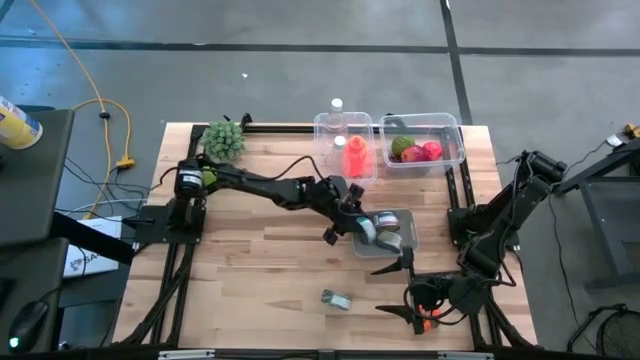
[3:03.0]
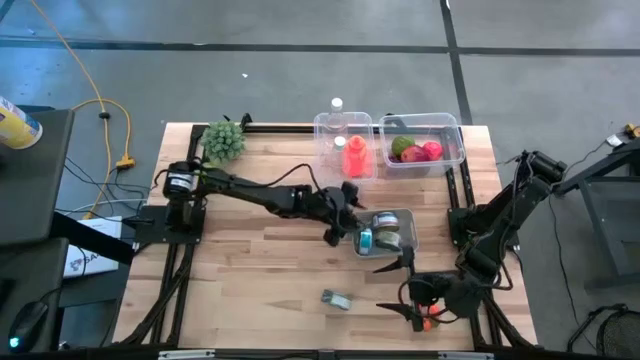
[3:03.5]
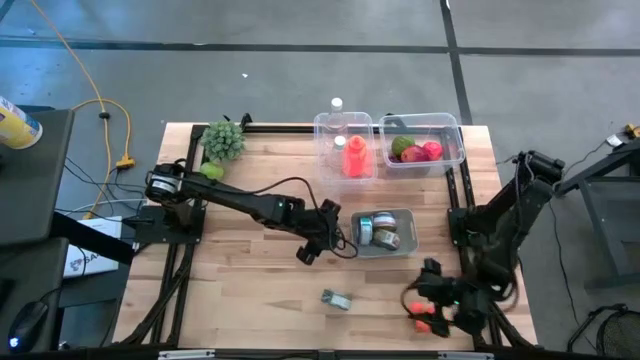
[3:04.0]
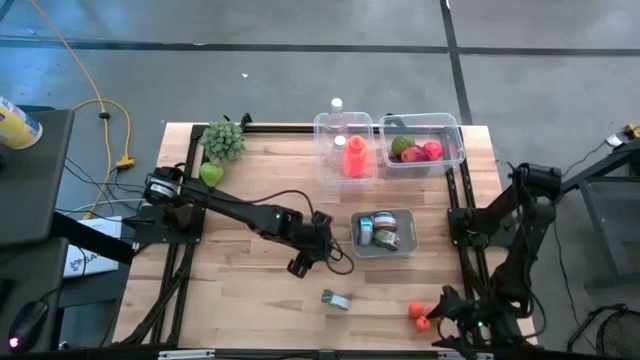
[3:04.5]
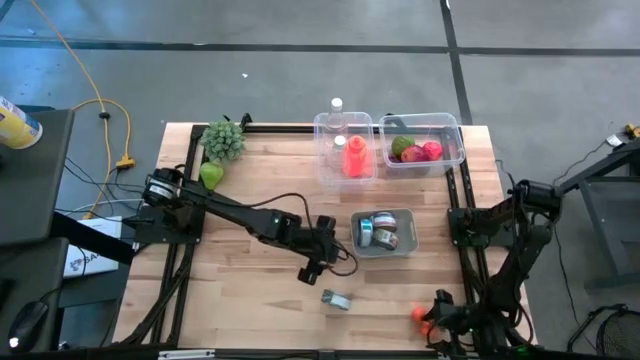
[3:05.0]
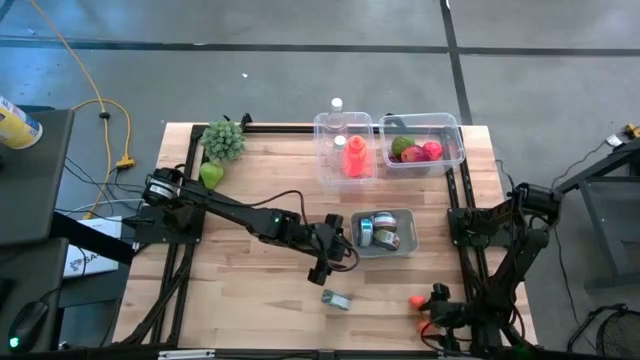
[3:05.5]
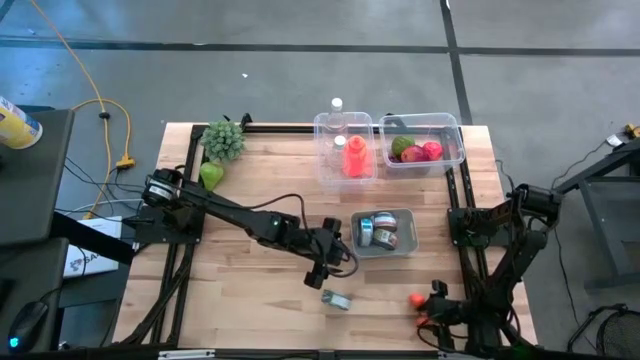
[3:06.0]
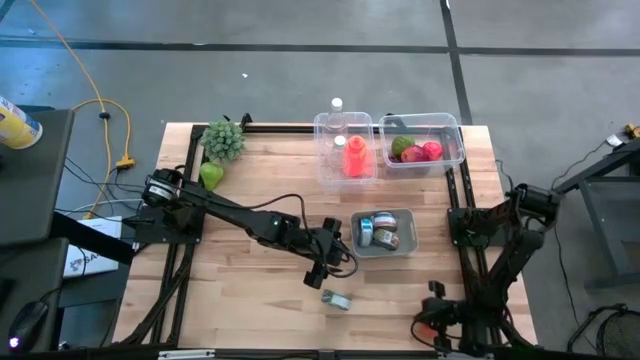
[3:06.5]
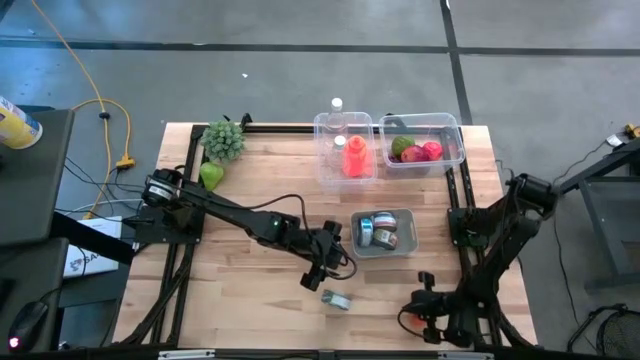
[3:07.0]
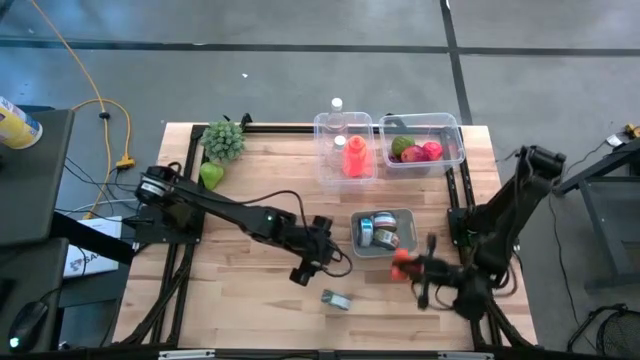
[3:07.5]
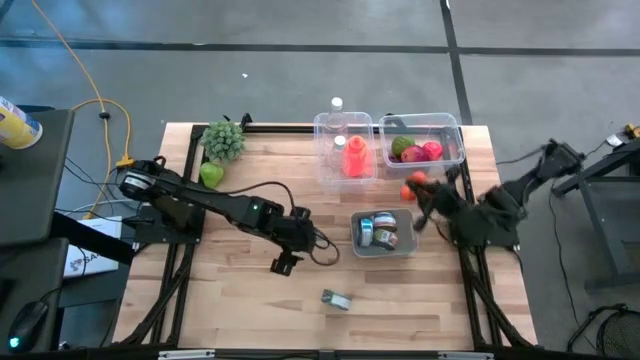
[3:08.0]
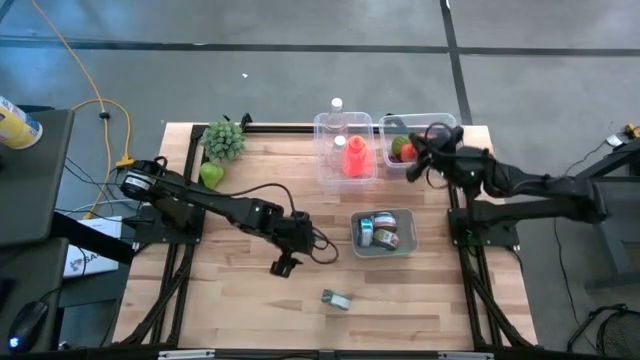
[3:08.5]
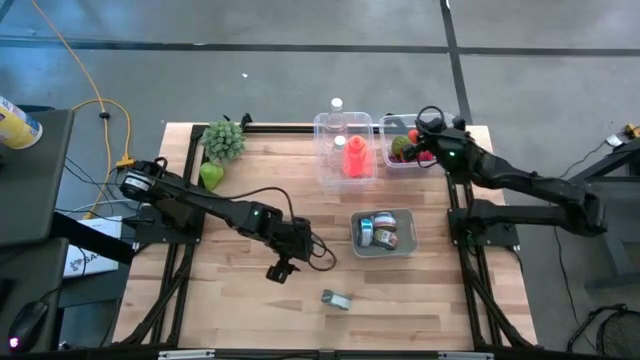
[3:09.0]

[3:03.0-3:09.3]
Task: Pick & Place Food Item
Put the tangerines into the right transparent bin

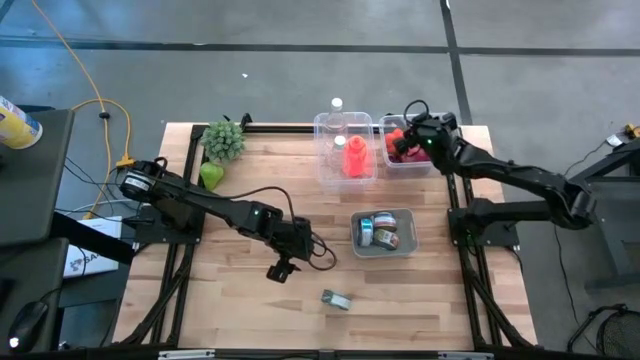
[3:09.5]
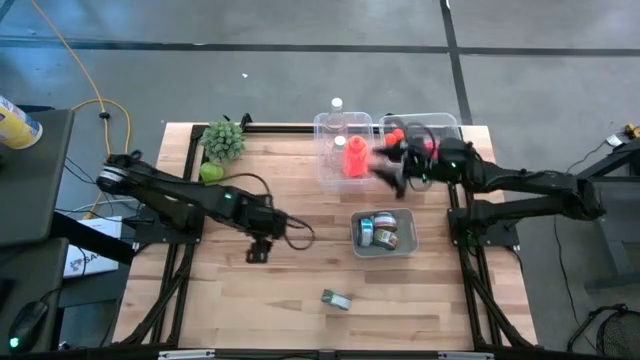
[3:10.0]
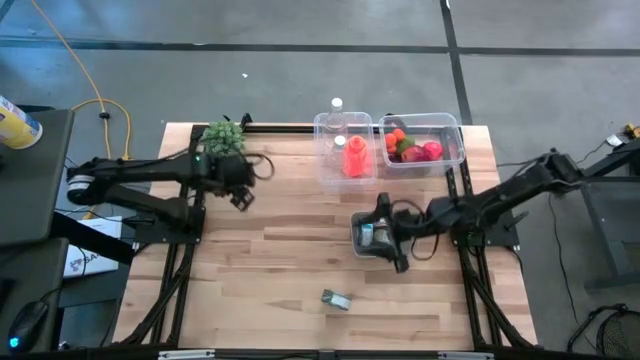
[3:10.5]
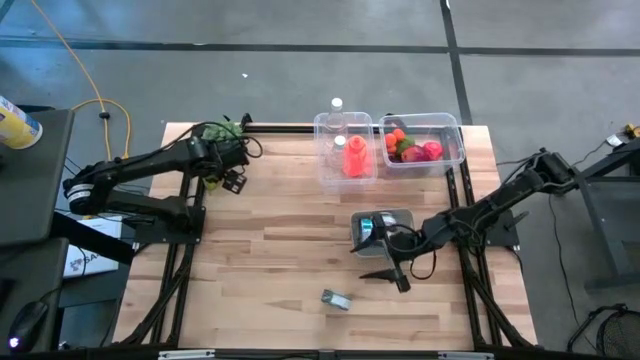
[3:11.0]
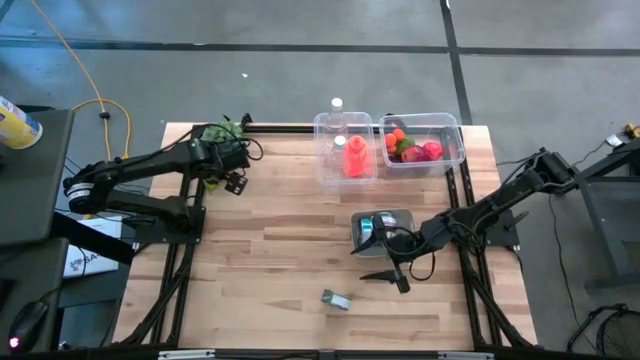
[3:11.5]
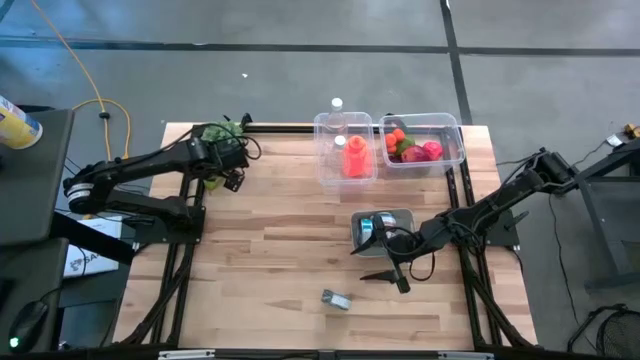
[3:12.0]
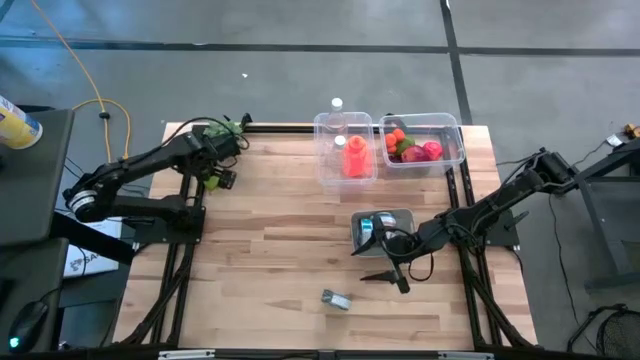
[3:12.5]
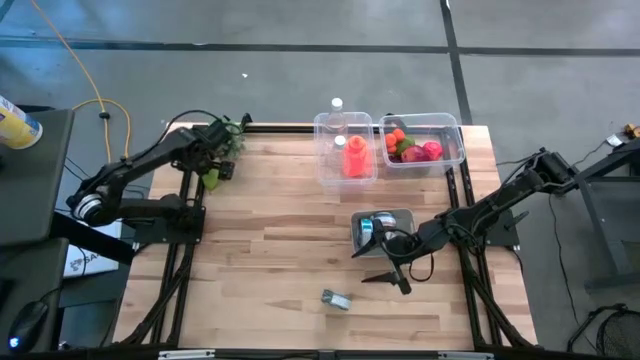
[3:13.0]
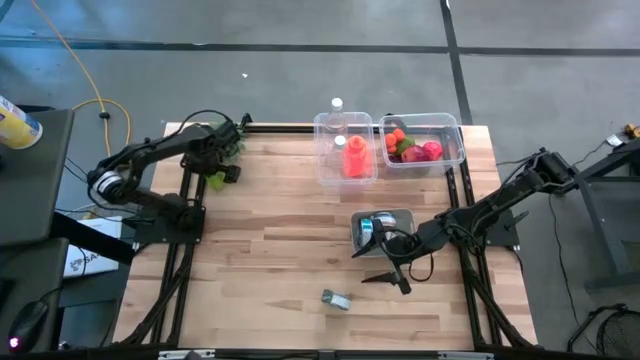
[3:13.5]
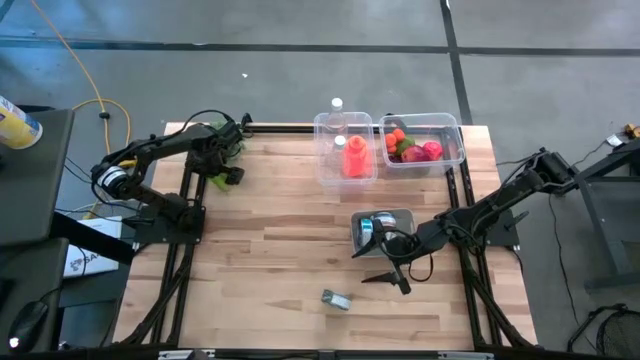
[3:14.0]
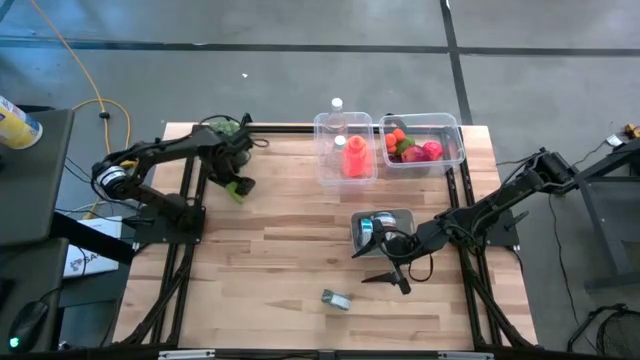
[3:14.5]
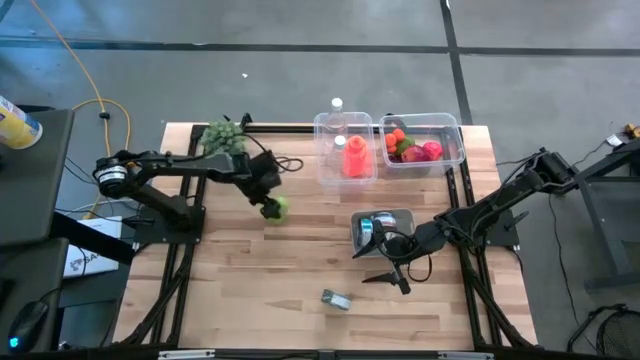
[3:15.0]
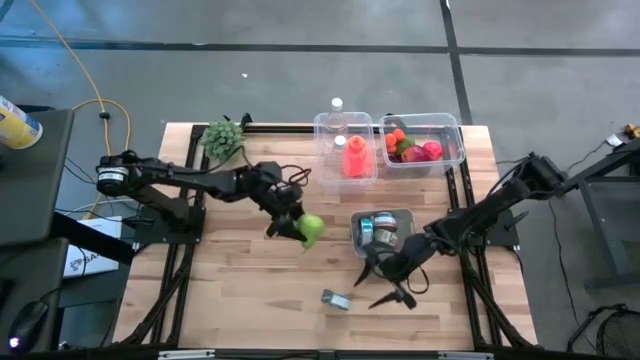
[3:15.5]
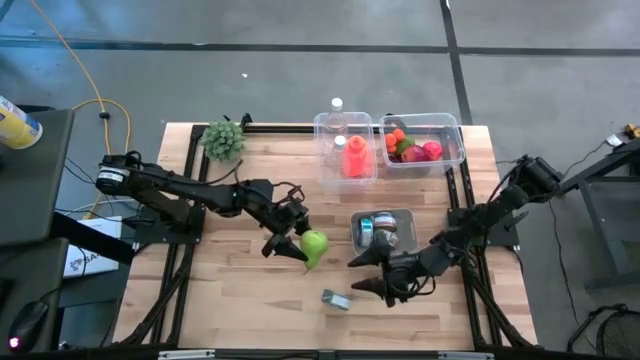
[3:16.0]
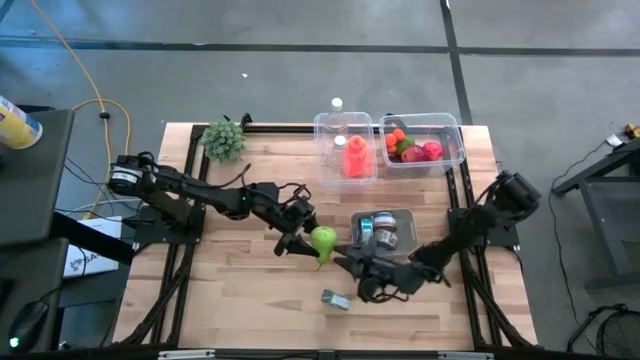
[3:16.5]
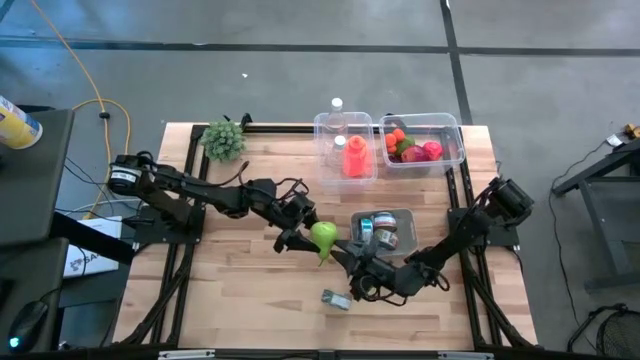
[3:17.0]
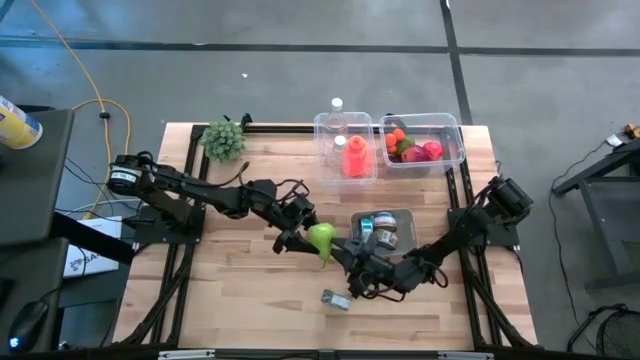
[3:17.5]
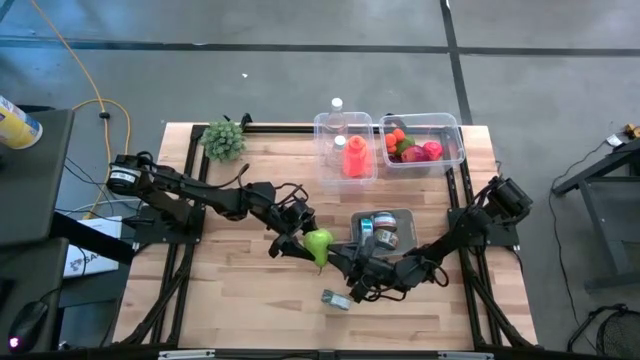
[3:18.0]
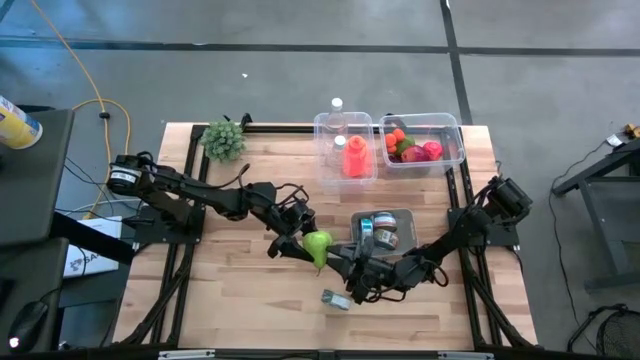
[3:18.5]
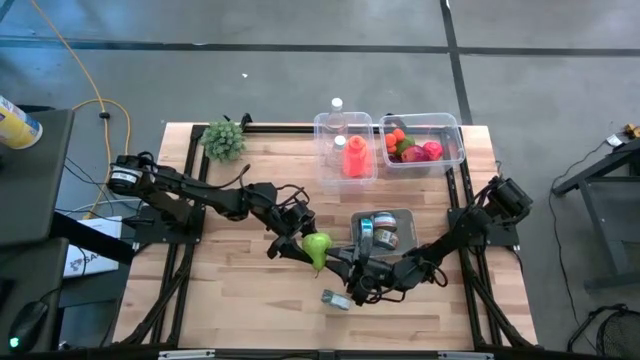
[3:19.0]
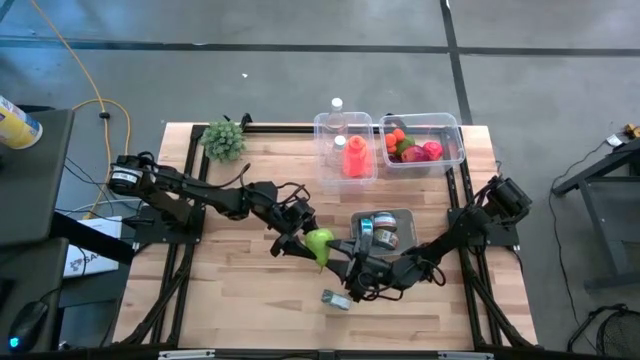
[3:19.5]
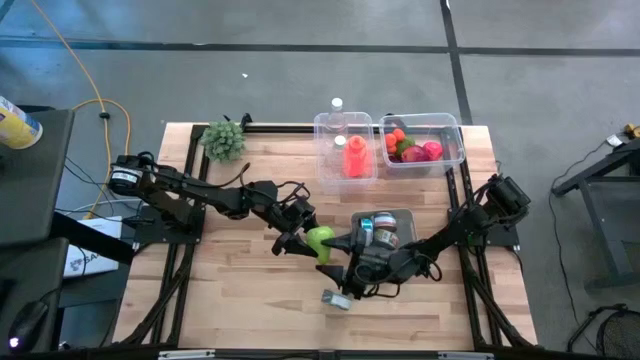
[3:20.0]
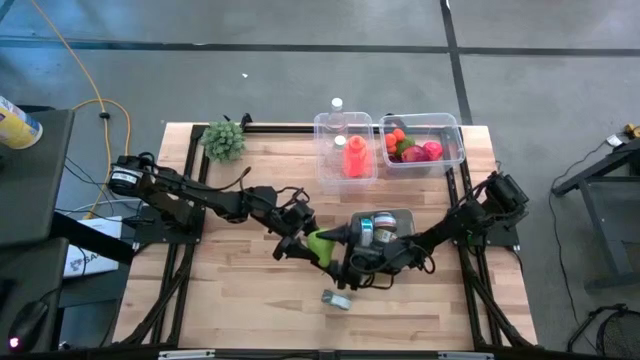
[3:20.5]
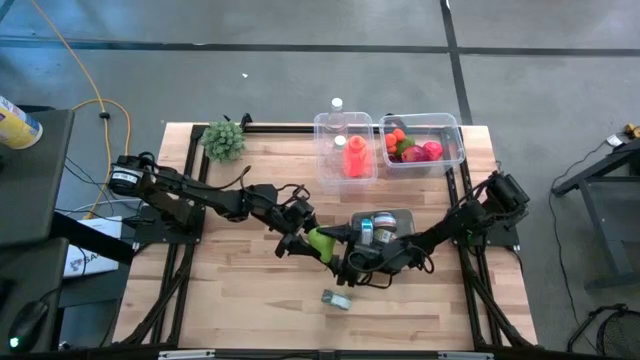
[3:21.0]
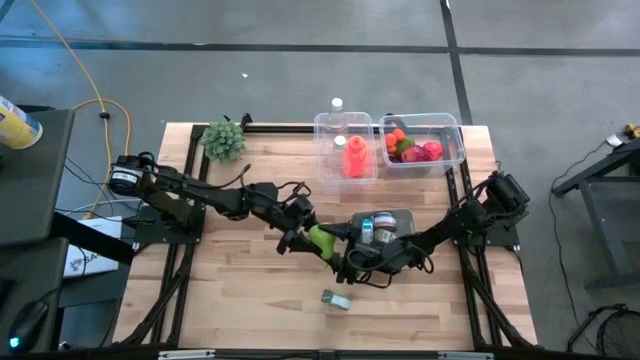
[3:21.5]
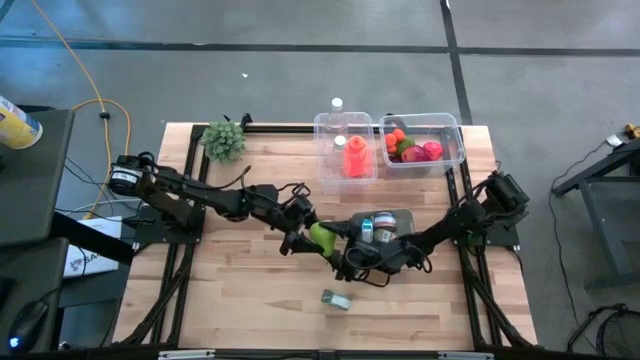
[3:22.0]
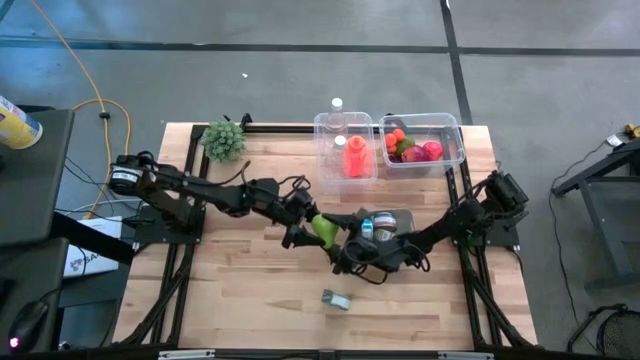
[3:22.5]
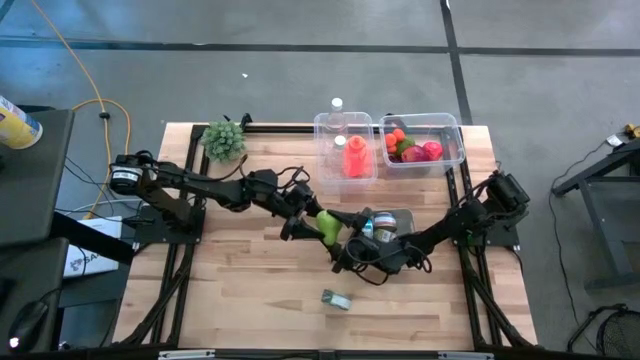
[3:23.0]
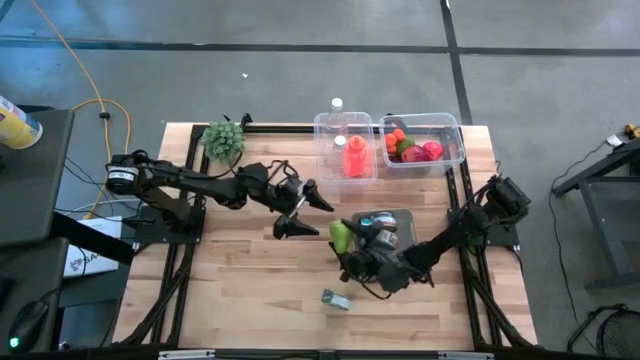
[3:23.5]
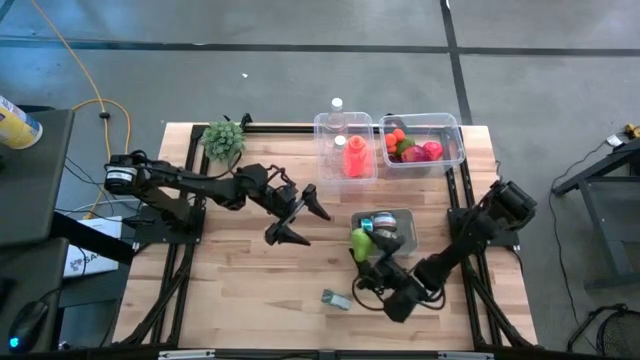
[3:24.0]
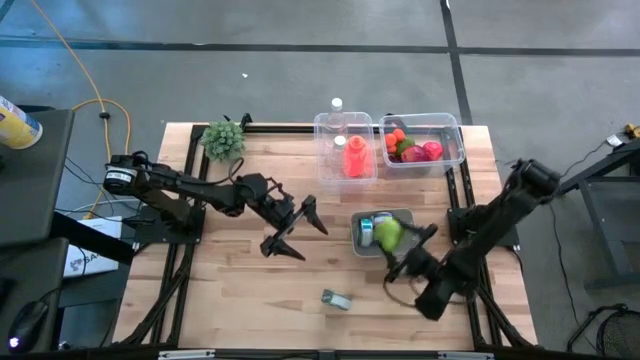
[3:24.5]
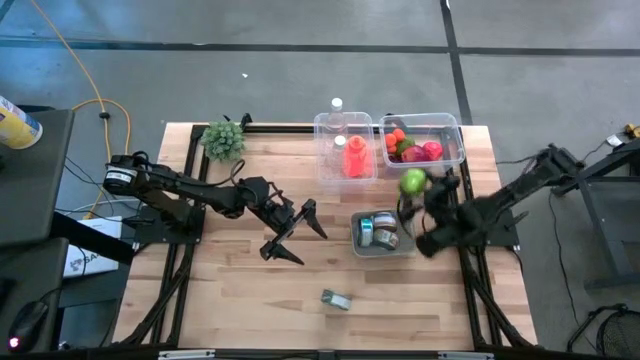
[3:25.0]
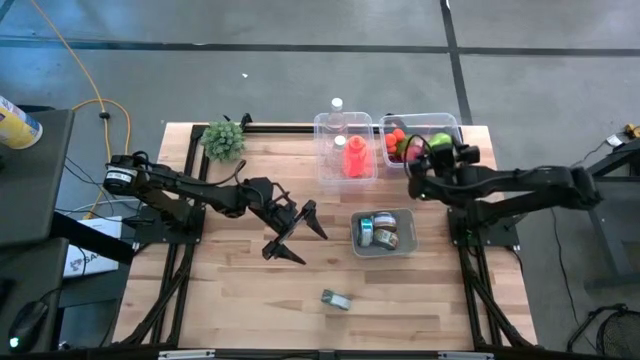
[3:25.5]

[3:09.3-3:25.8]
Put the pear into the right transparent bin
